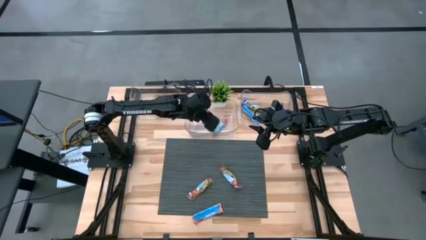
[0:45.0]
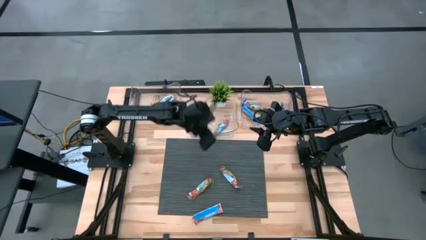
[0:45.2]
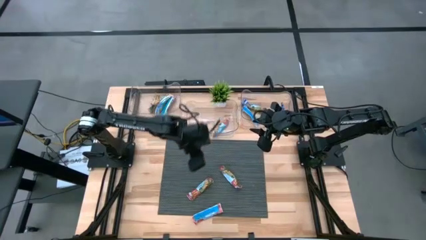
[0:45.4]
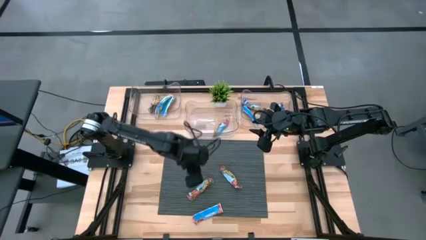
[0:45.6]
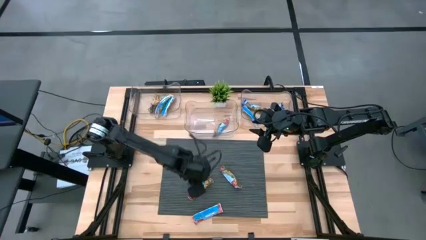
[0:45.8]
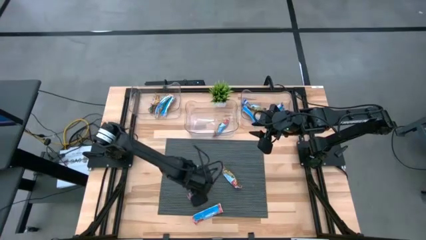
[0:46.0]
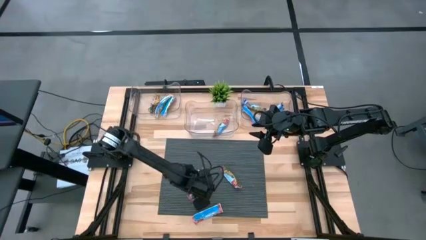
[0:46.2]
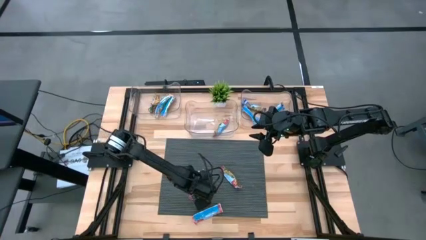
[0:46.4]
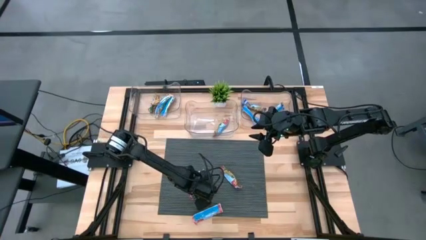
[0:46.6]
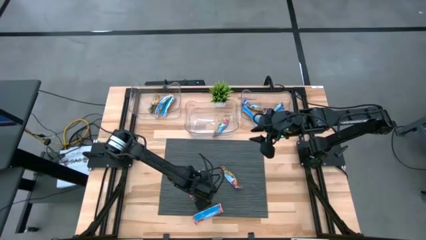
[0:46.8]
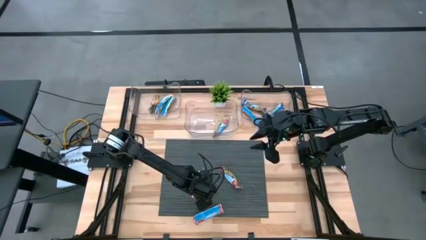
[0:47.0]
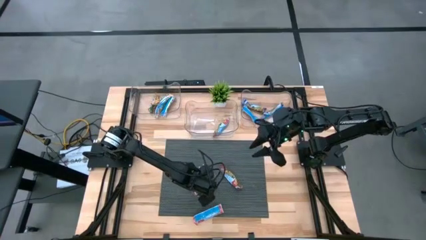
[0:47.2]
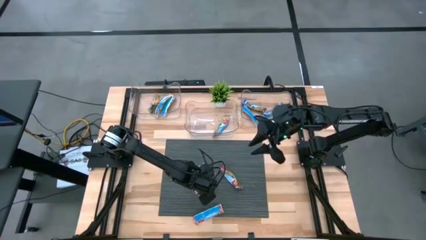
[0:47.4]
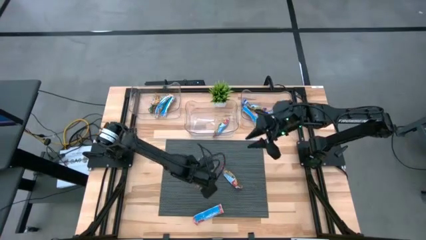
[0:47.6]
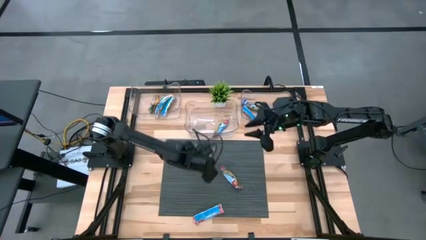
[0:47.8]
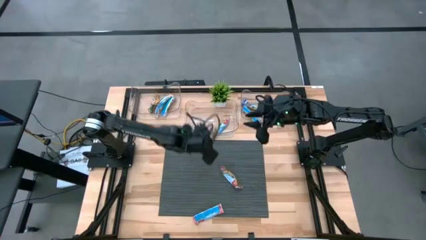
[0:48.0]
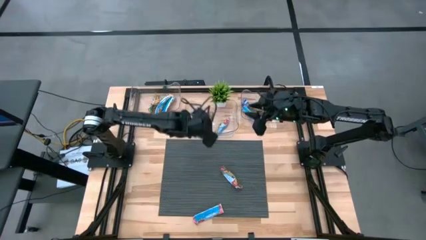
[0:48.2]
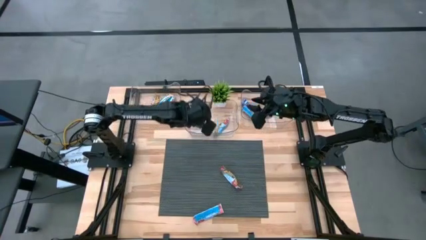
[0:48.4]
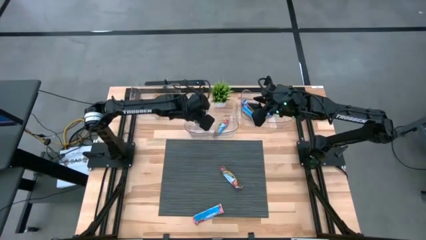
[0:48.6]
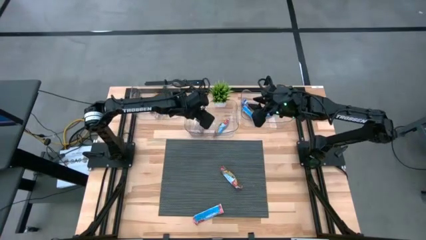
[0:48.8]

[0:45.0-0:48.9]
Task: Pick and place Granola Bars by type
Put the red granola bar into the center transparent bin

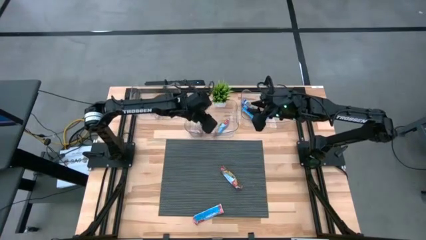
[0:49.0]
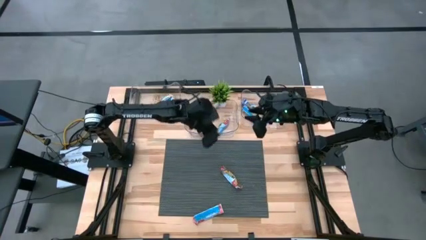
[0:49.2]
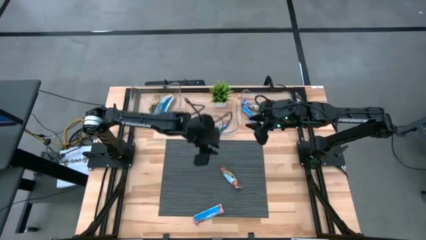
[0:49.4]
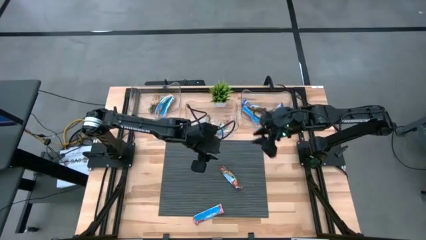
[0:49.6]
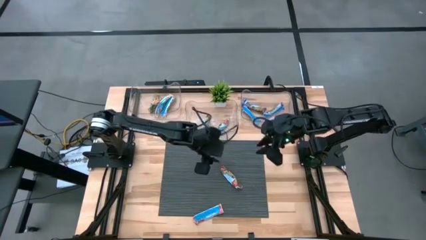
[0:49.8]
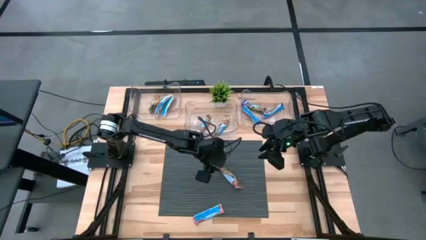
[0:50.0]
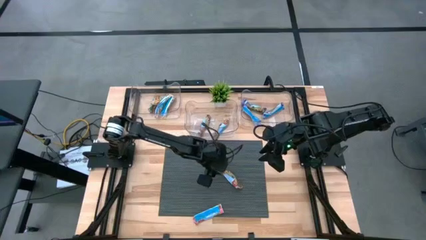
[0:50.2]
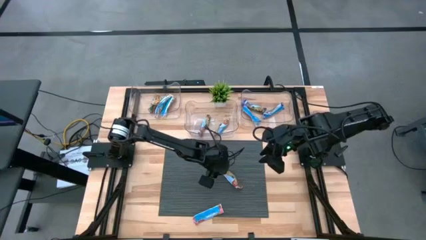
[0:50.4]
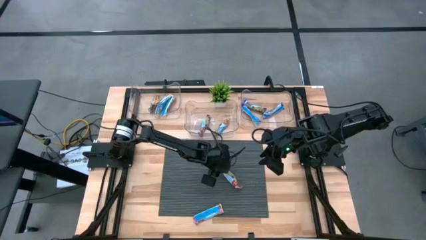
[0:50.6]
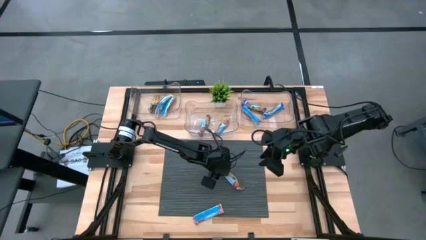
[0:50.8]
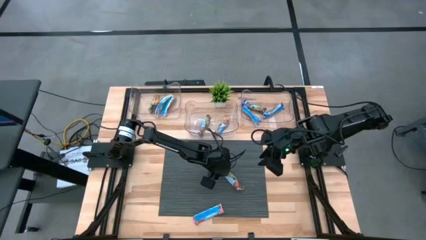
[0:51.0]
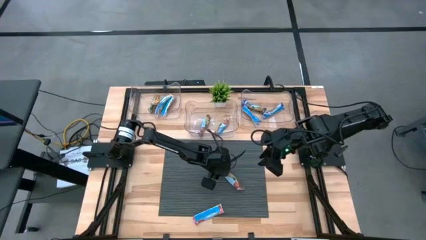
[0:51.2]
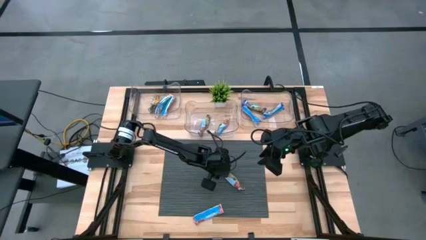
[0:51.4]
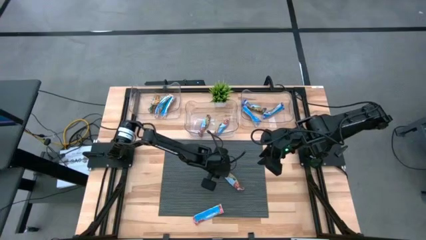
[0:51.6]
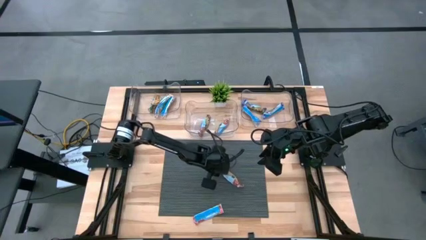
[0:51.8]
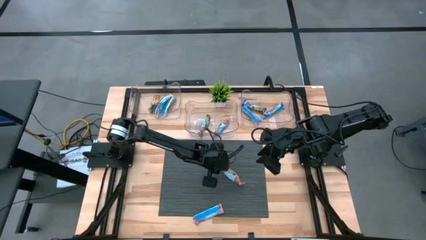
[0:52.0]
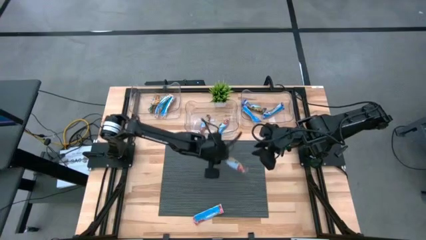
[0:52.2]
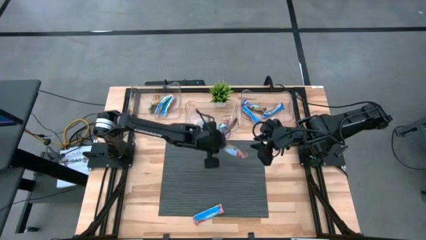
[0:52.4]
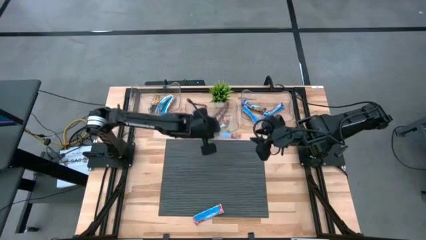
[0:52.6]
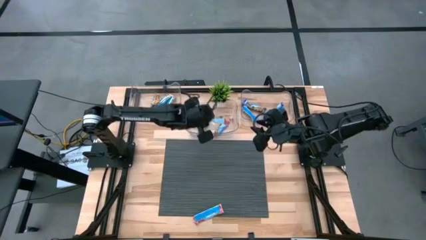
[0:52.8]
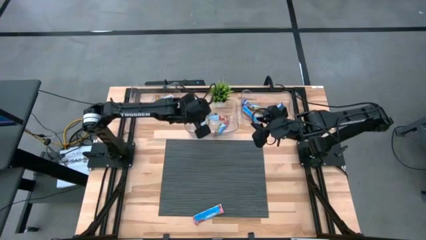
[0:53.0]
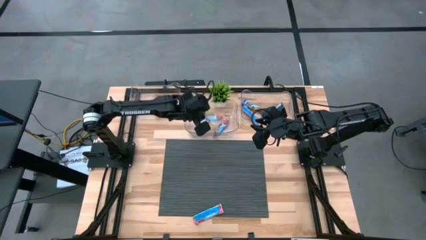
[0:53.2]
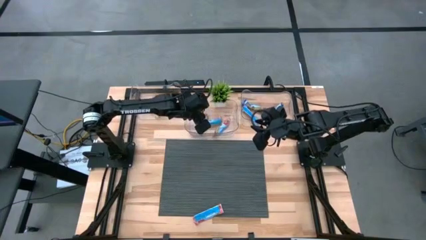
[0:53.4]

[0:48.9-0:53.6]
Put the red granola bar into the center transparent bin

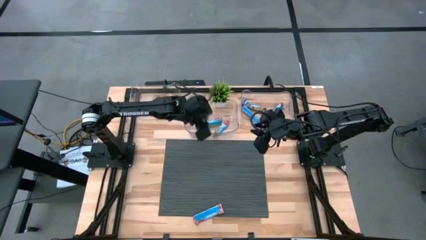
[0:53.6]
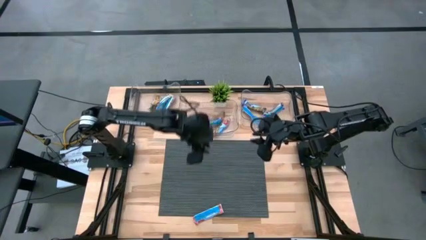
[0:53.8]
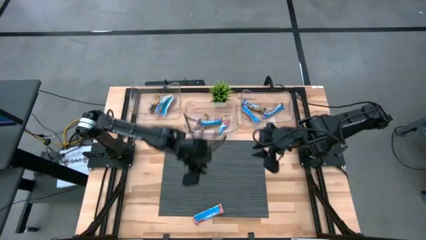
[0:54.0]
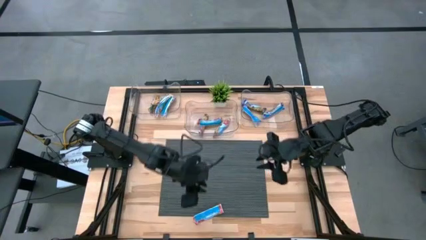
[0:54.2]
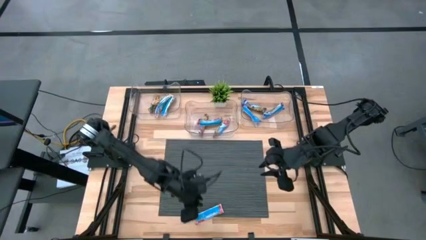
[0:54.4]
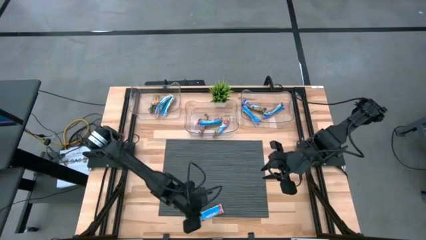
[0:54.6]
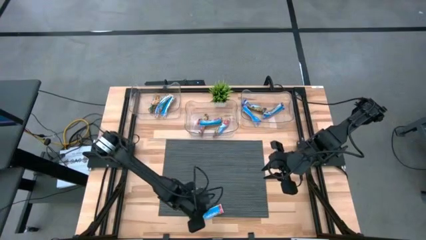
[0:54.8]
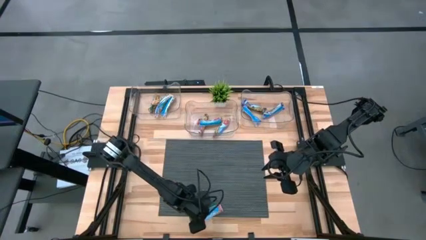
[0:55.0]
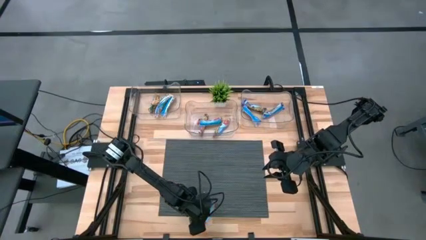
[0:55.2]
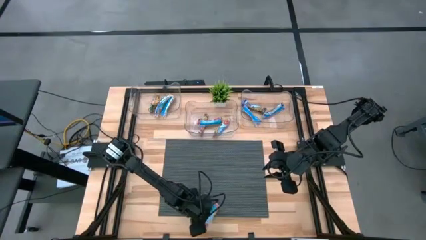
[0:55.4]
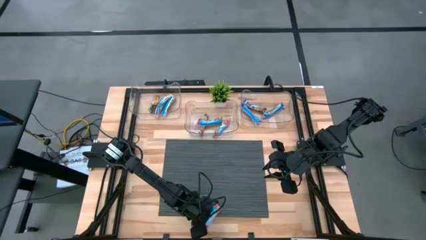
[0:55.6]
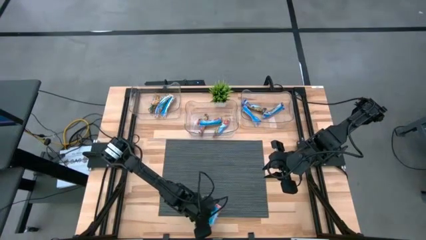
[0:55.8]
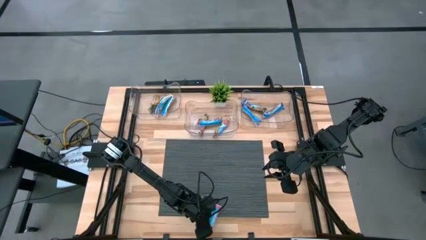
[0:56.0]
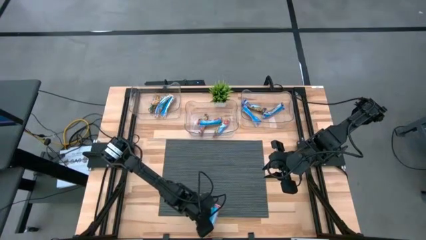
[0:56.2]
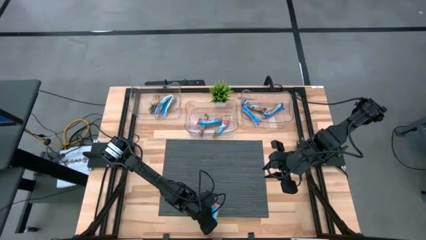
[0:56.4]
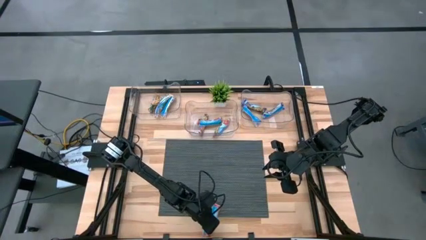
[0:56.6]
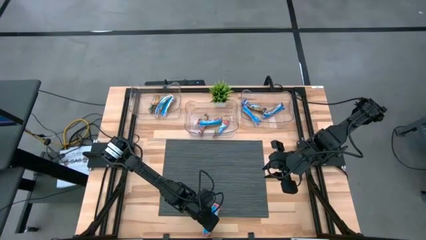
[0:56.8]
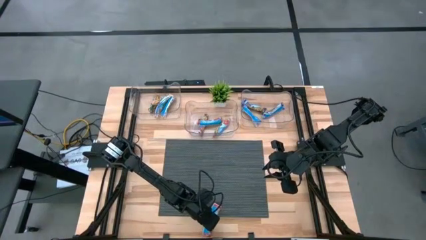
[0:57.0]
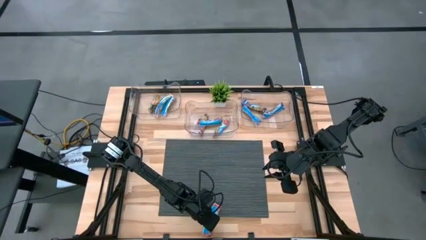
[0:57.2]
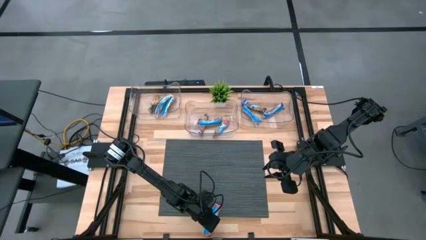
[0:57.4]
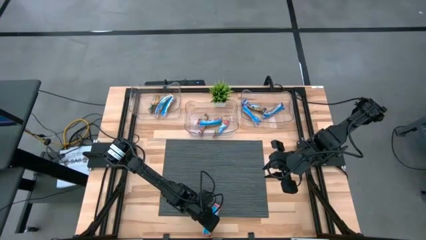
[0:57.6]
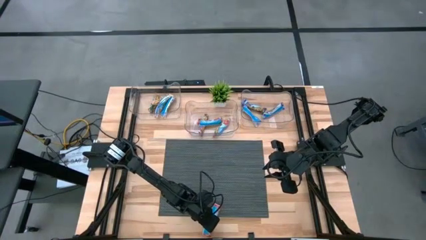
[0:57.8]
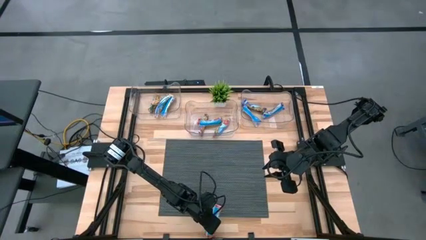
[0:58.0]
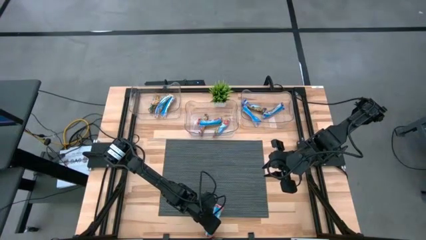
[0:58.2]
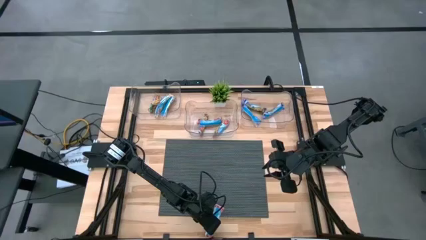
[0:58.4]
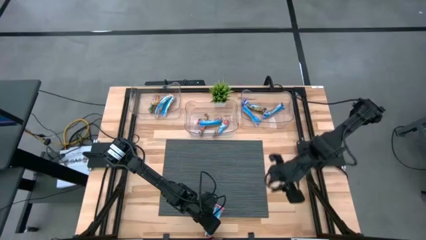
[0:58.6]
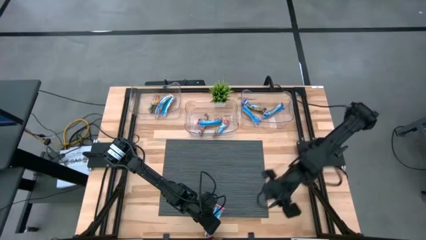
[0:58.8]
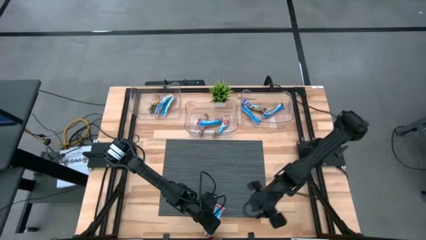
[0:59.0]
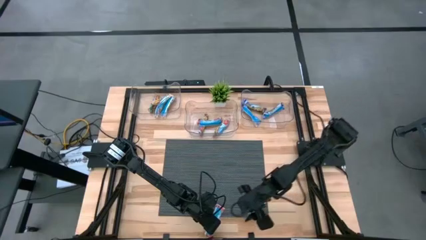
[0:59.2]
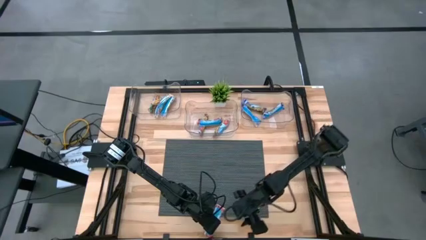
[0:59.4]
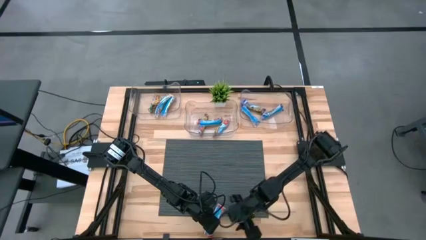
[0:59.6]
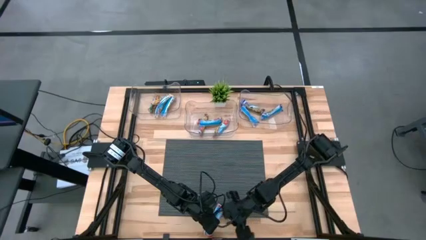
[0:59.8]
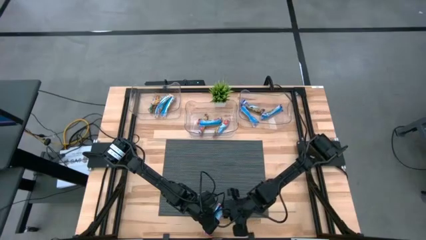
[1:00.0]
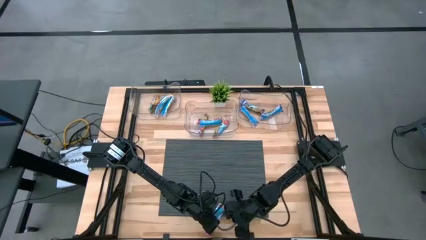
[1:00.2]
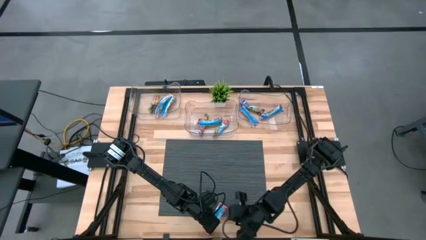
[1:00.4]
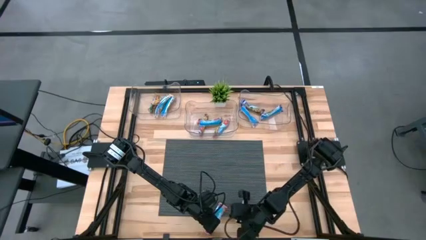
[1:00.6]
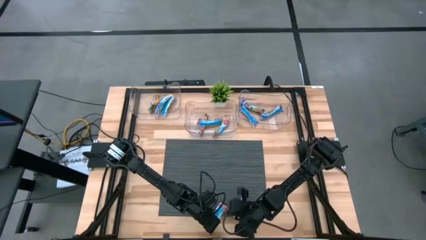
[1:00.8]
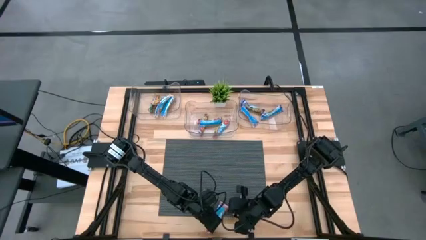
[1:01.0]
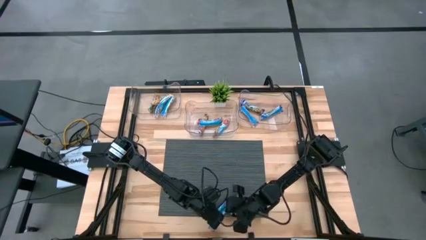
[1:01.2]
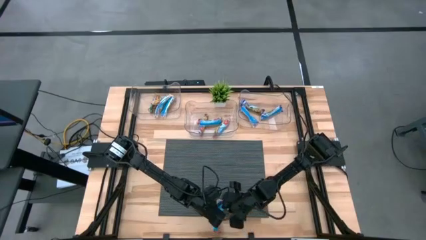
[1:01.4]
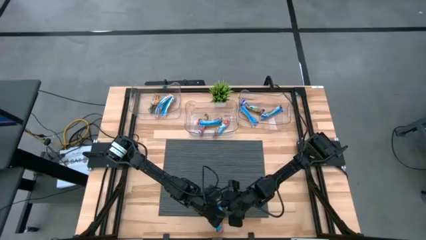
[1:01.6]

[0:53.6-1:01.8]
Put the red granola bar into the center transparent bin
